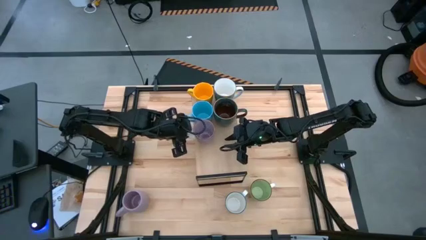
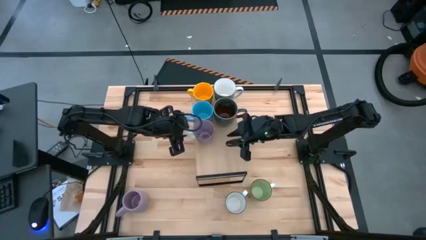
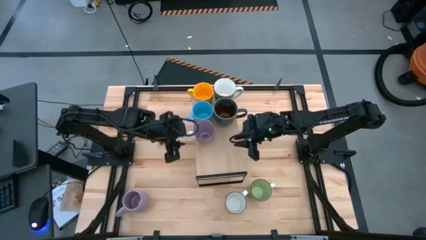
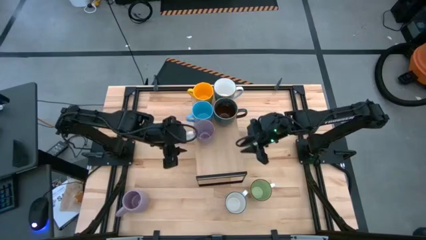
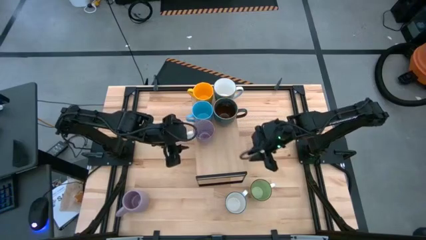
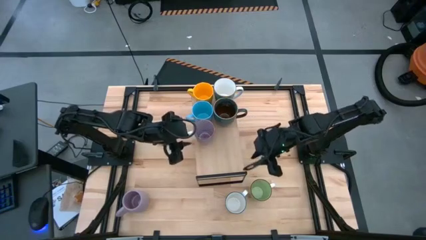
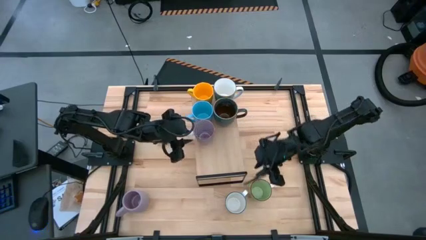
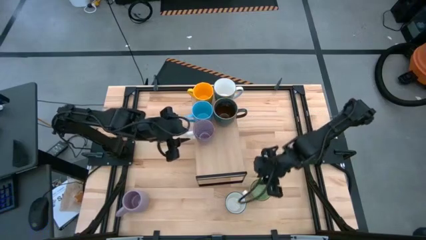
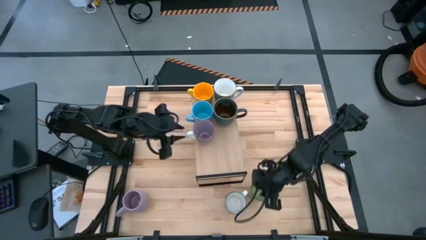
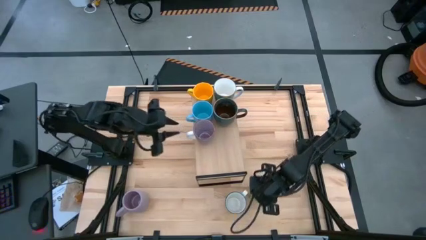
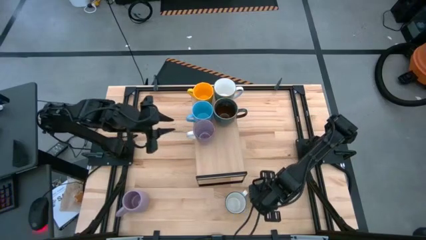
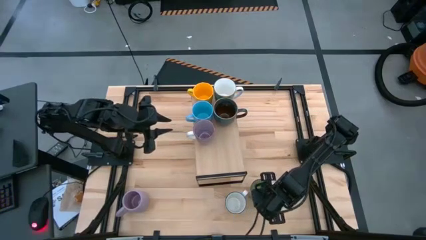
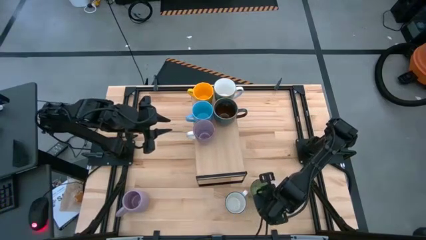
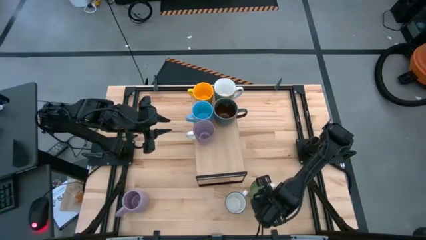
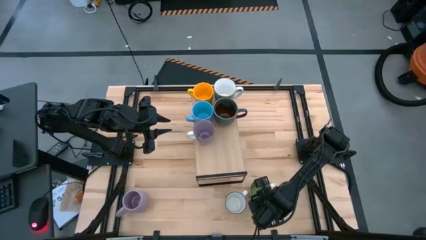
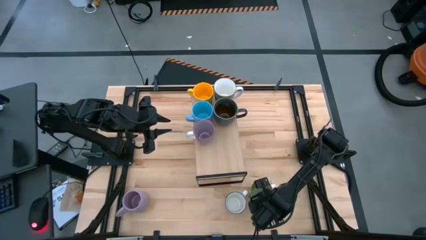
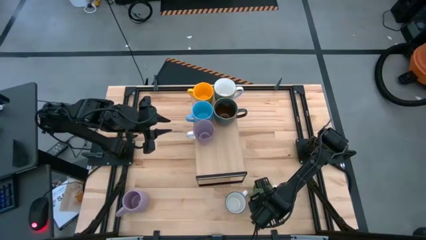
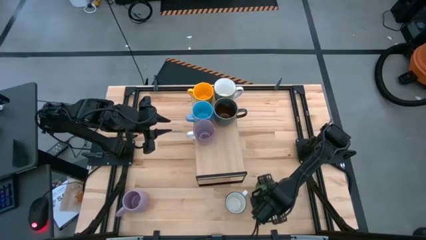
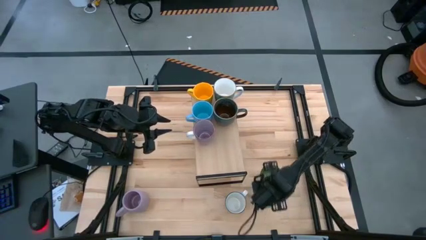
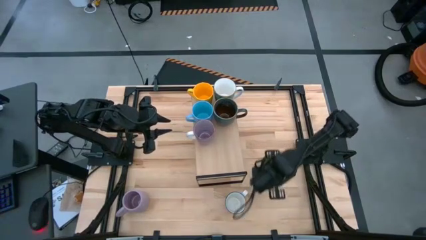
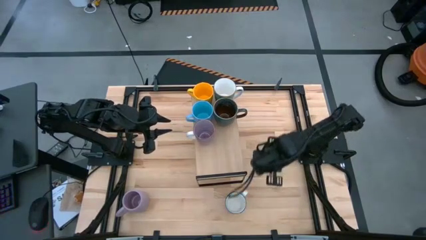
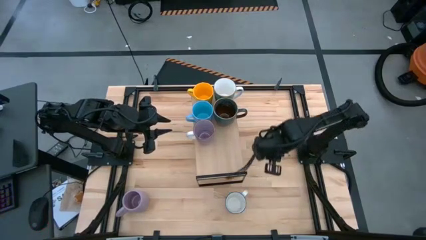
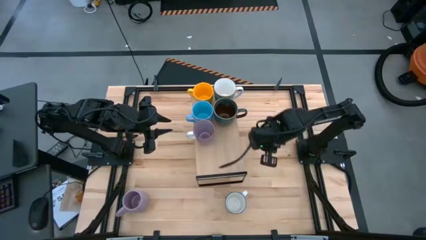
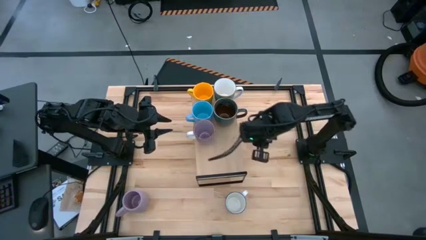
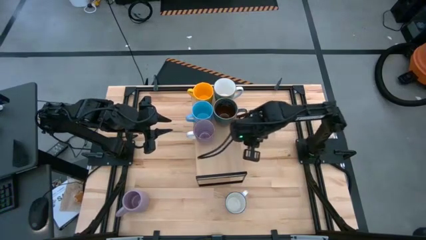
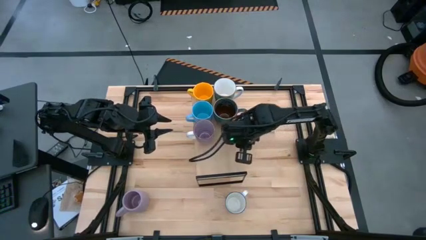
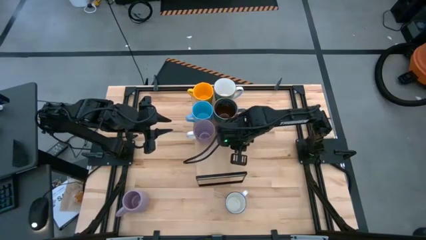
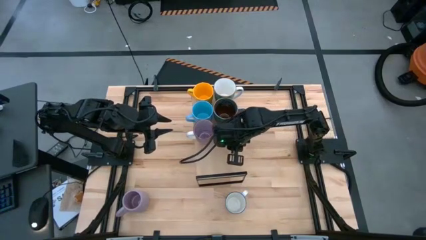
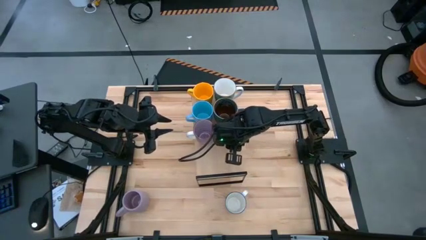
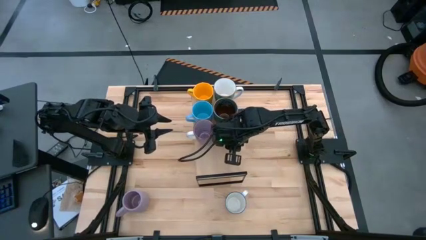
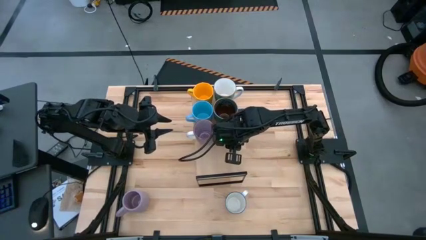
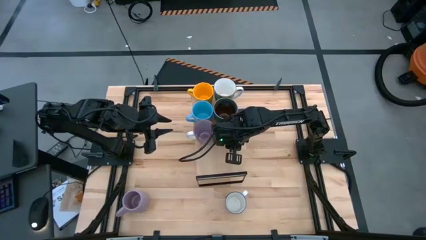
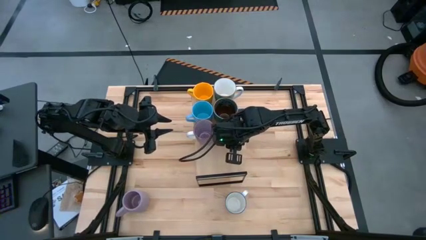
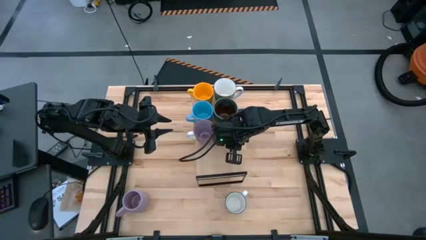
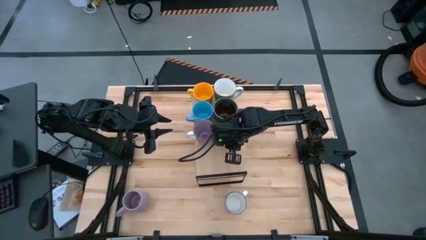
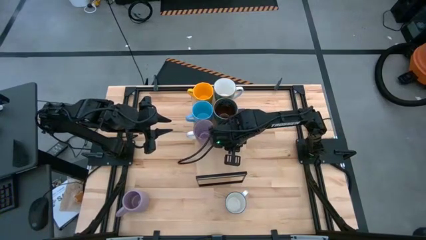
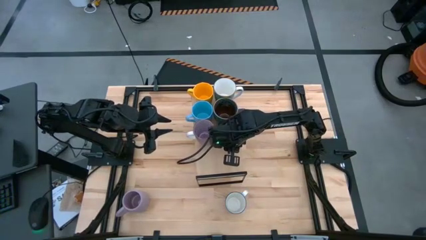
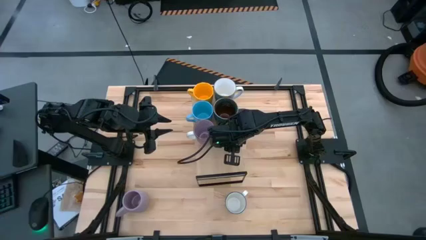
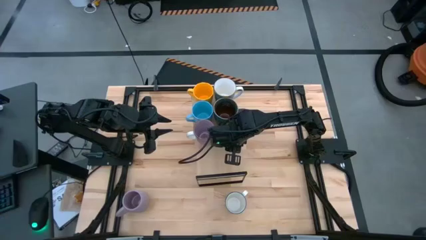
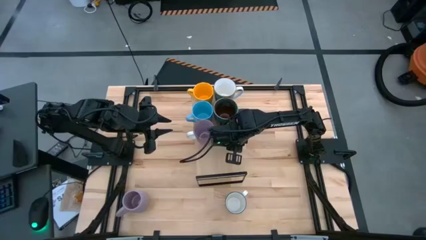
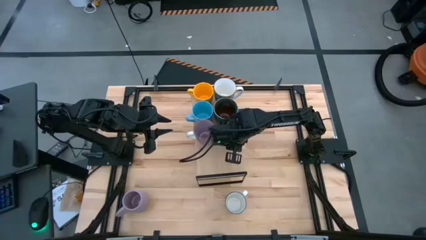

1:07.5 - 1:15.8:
Task: Place coffee mugs
Put the green mug on the shelf

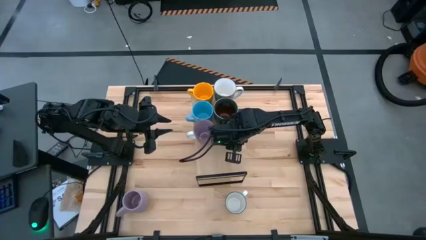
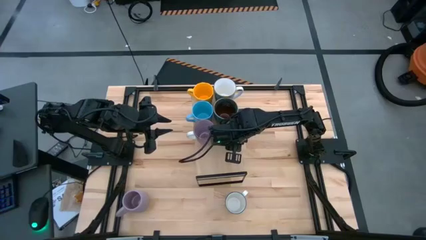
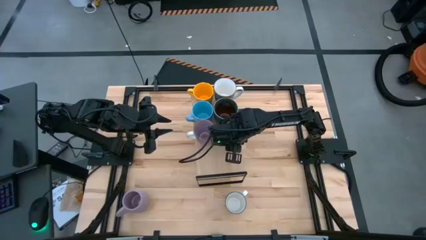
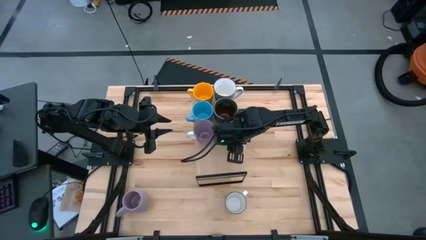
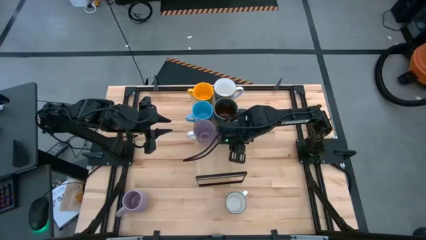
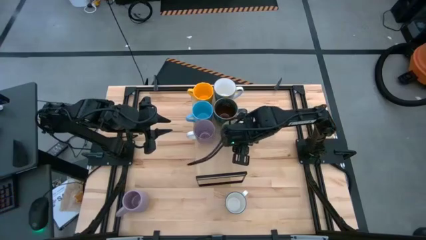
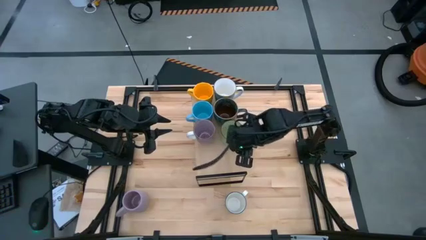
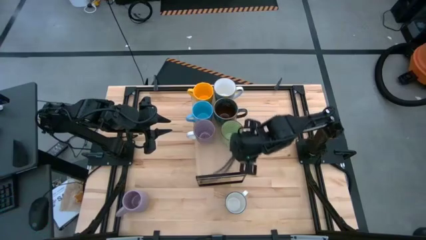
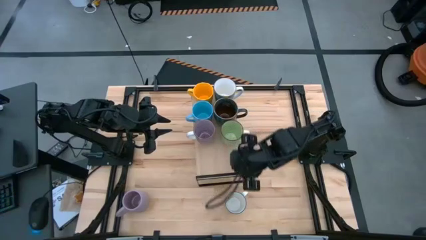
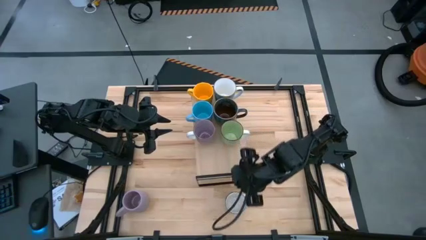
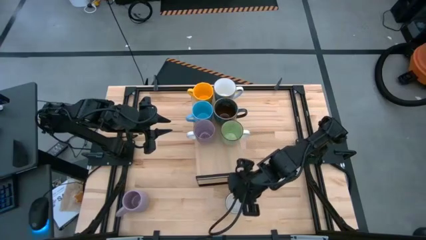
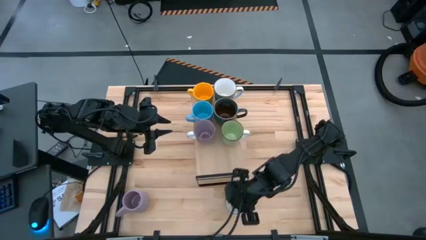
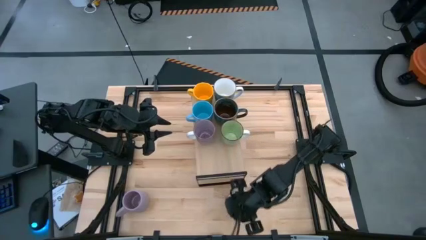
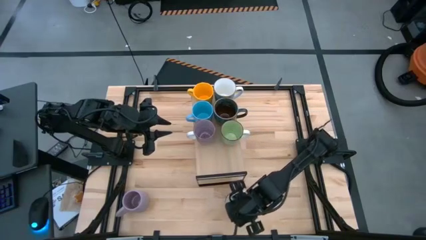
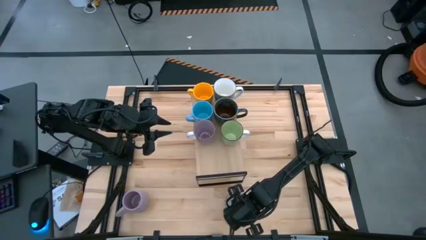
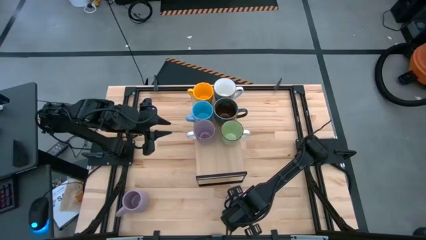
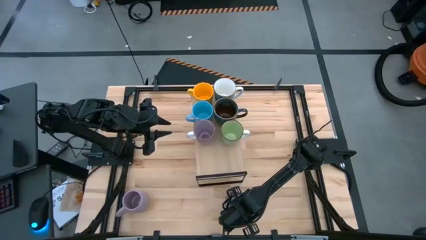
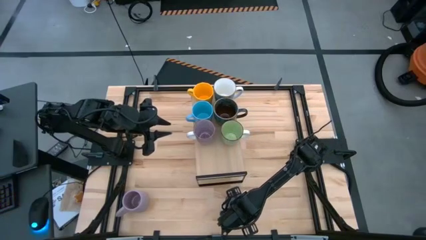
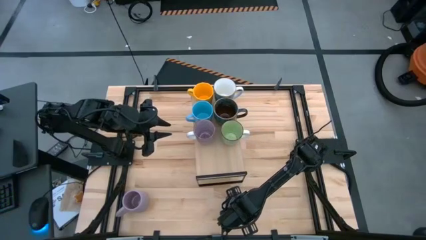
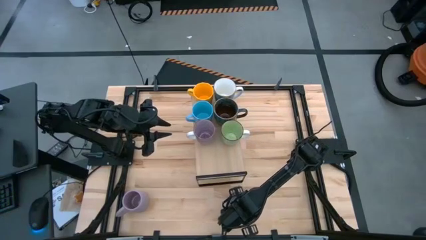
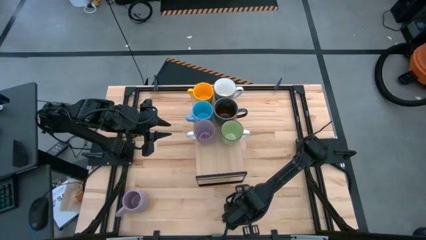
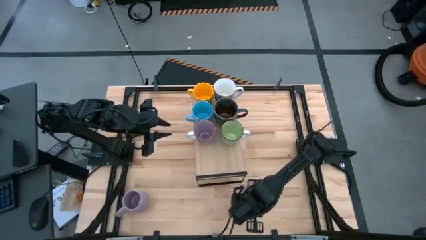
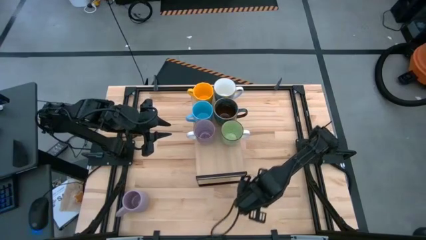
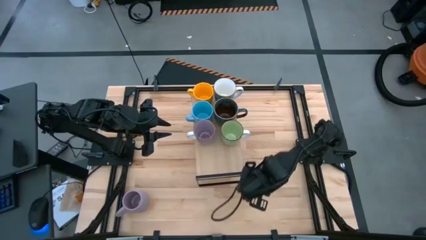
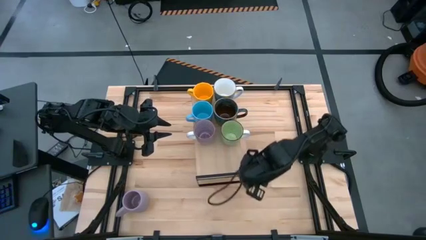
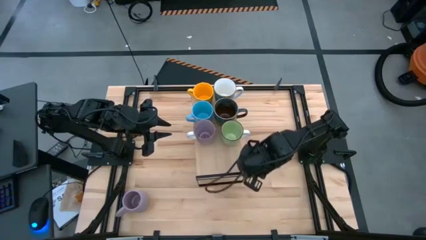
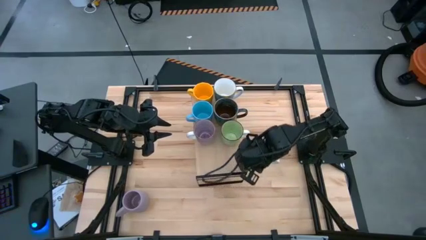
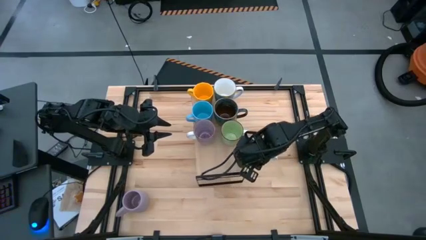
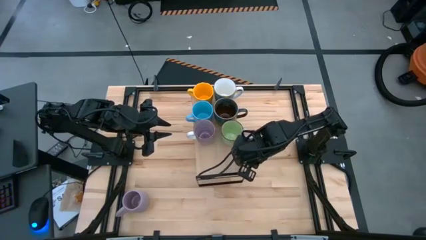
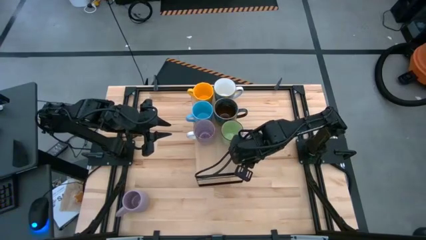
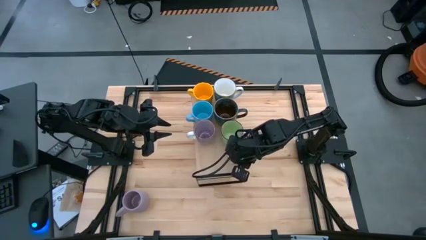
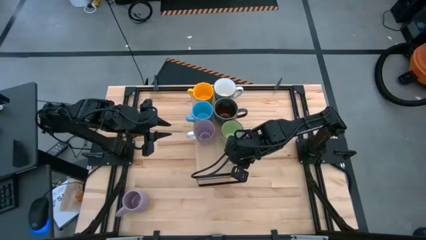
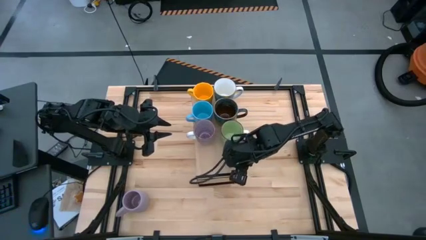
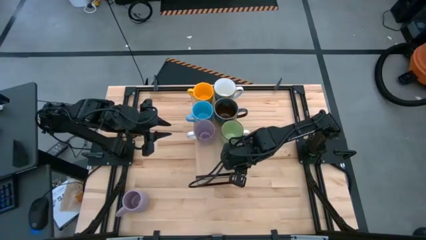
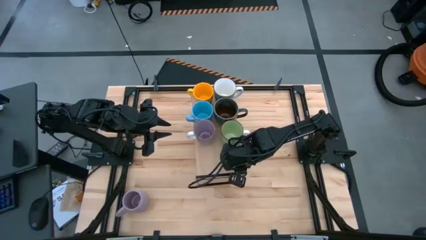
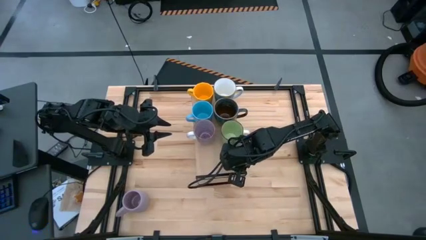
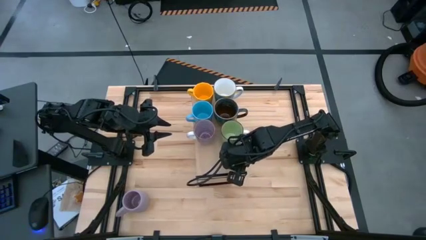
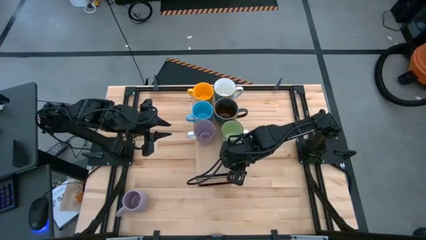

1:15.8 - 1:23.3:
Put the white mug on the shelf
